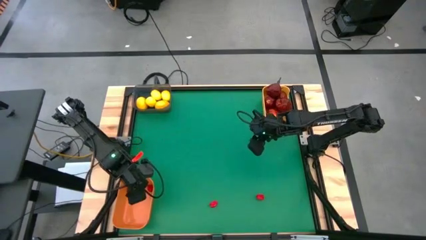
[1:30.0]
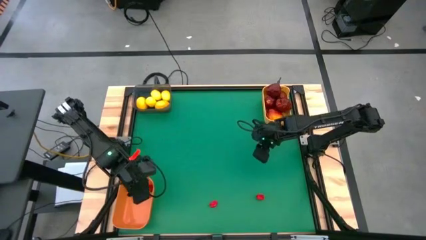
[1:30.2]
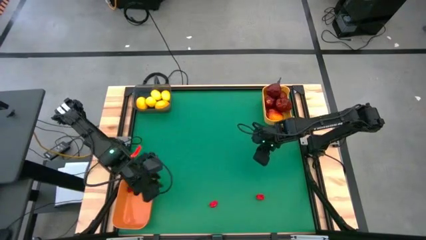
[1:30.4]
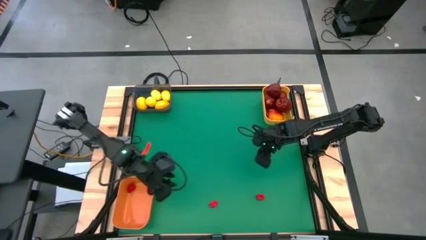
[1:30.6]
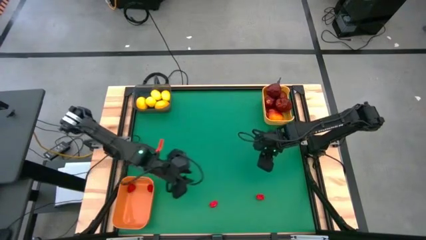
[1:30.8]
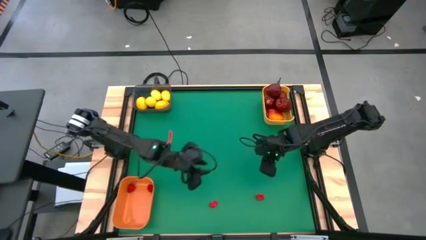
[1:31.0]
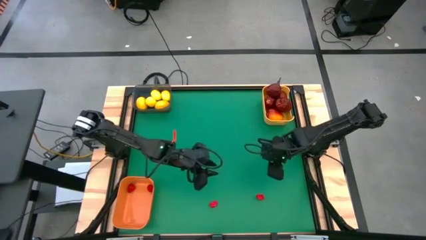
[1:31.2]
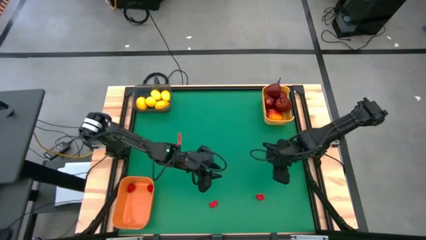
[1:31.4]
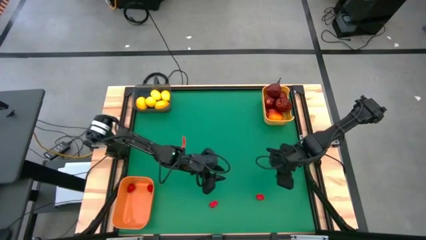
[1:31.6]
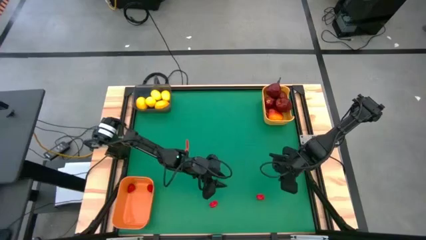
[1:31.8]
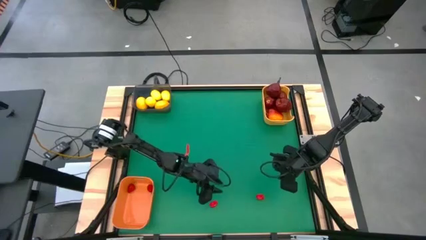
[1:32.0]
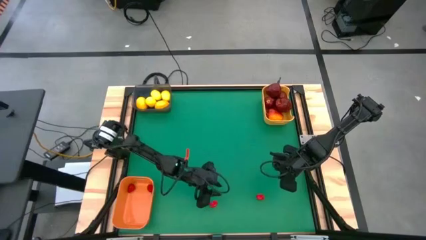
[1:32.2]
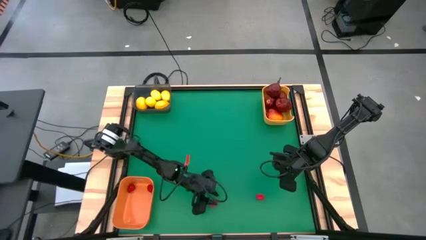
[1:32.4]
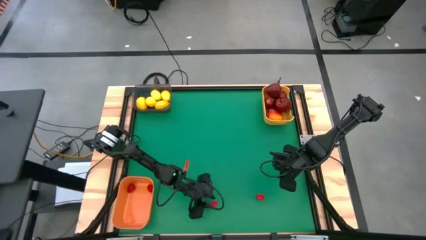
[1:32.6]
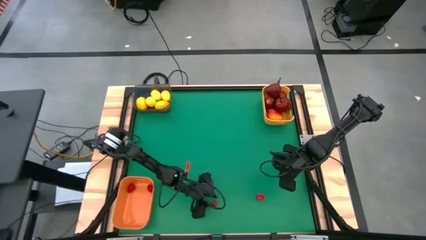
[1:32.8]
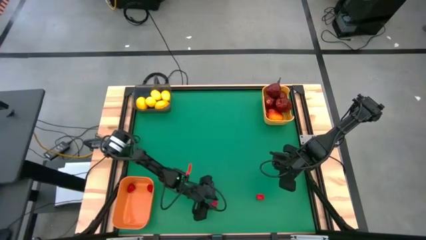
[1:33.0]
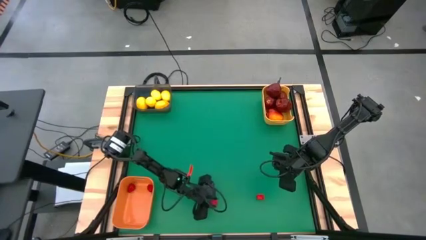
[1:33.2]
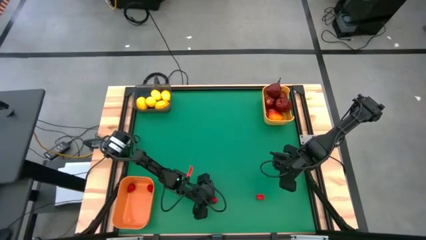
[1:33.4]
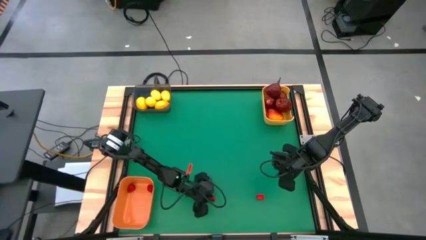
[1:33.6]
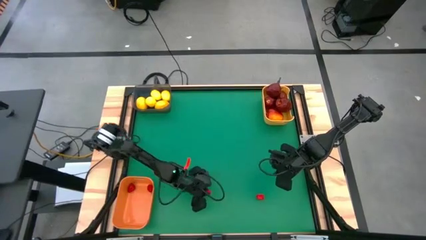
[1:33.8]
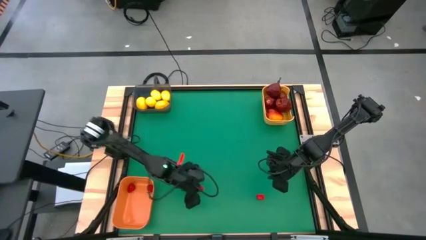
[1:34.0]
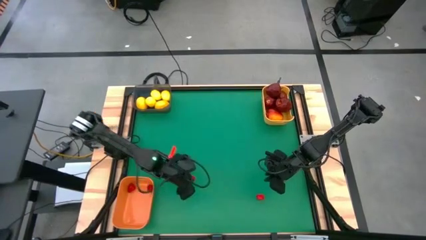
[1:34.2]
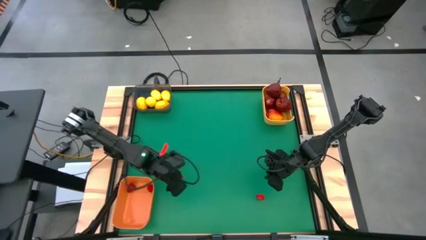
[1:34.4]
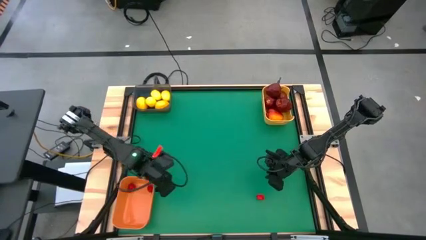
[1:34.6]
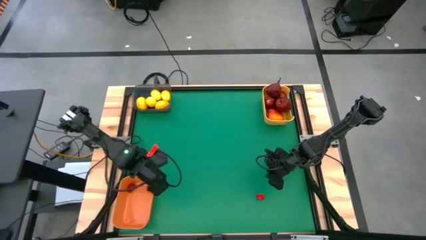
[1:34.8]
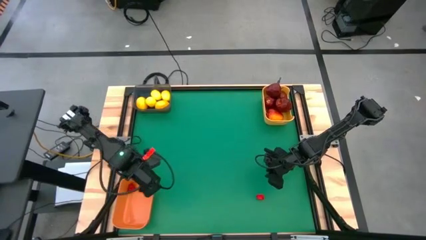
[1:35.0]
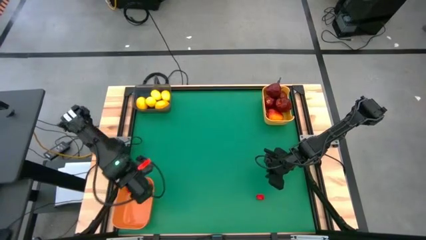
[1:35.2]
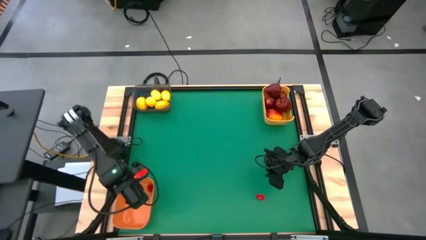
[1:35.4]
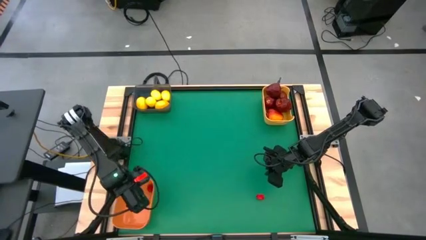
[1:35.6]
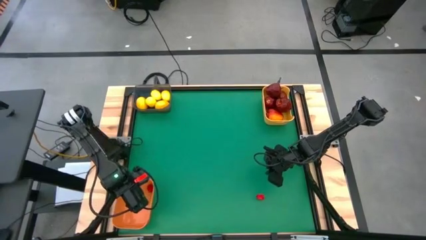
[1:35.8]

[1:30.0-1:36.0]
Task: Sort produce into baskets
Put the left red bell pepper into the orange bin

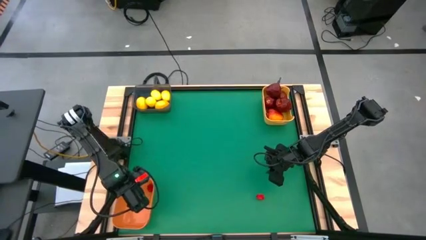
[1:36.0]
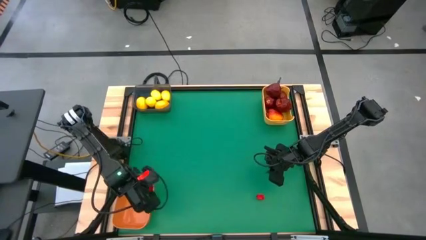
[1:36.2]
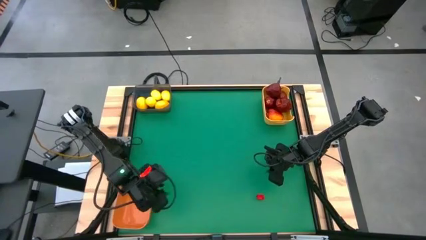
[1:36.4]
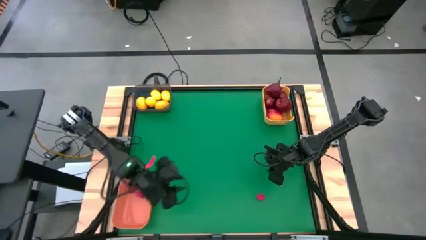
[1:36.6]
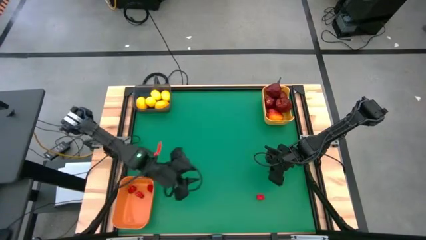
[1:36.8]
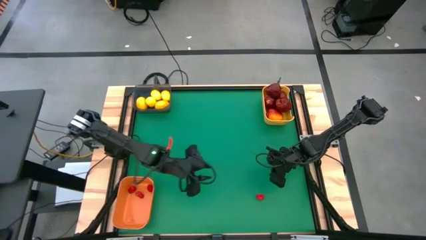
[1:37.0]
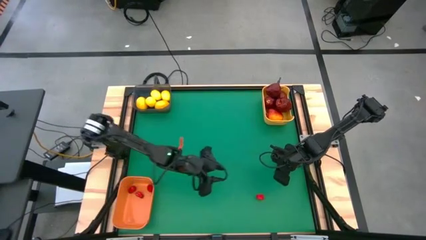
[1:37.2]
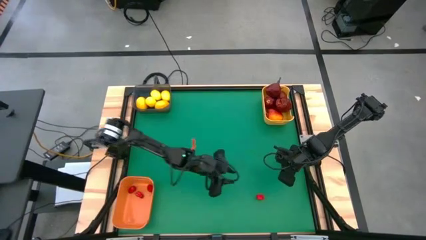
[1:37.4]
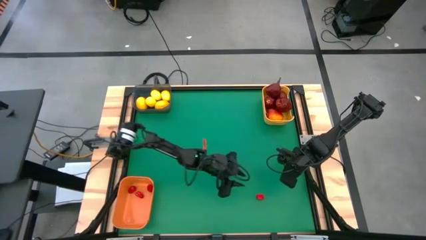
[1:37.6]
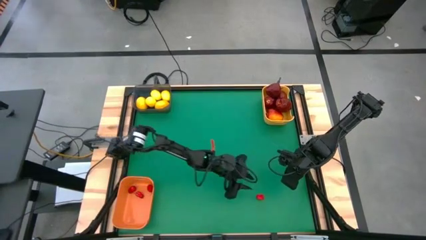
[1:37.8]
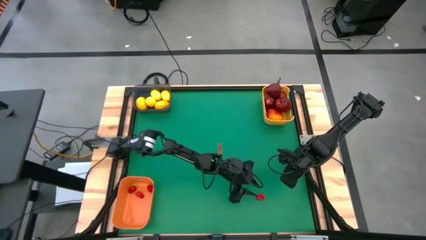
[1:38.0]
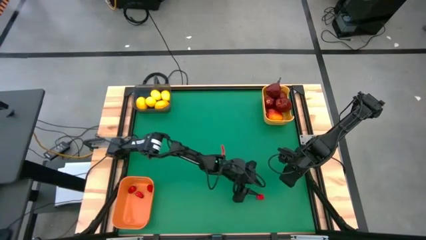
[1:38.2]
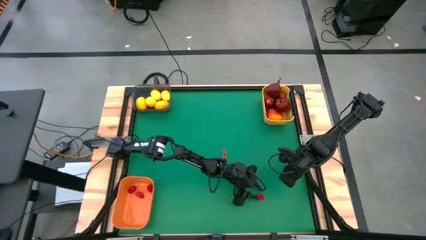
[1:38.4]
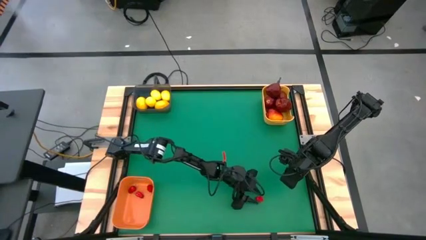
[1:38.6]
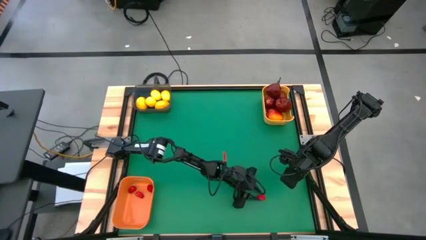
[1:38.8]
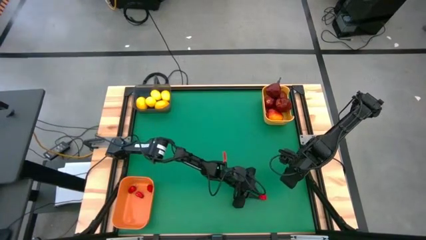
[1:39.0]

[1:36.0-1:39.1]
Put the red bell pepper into the orange bin

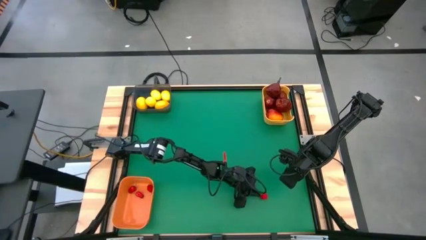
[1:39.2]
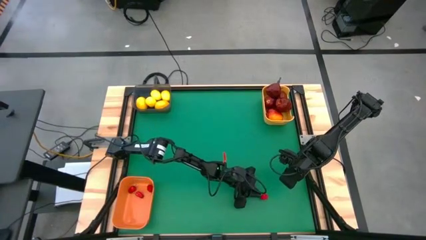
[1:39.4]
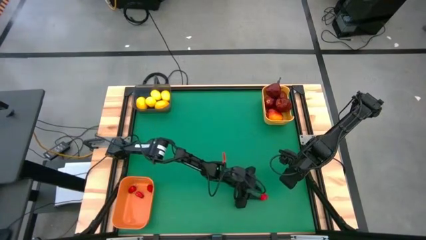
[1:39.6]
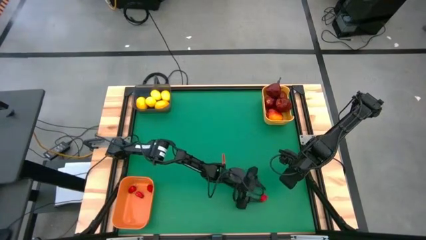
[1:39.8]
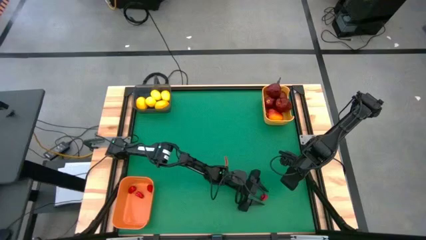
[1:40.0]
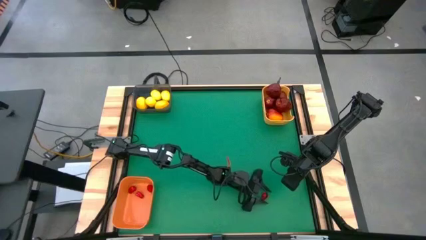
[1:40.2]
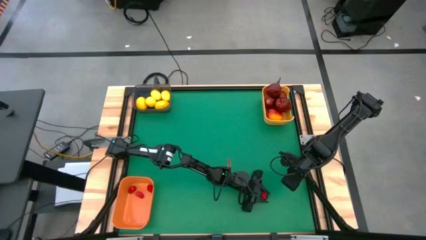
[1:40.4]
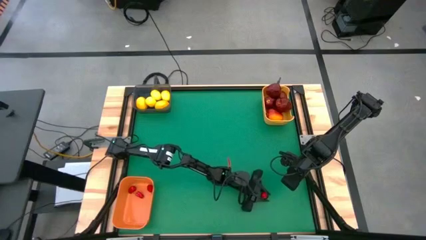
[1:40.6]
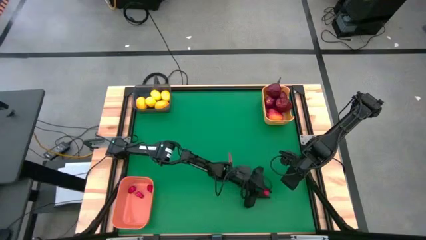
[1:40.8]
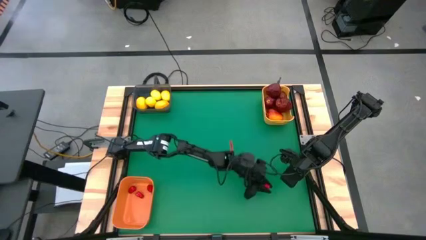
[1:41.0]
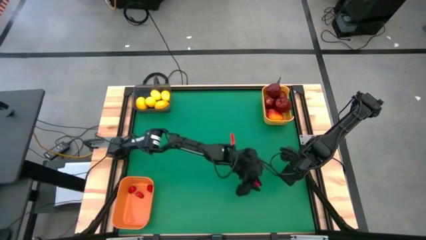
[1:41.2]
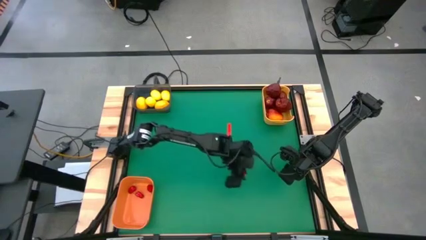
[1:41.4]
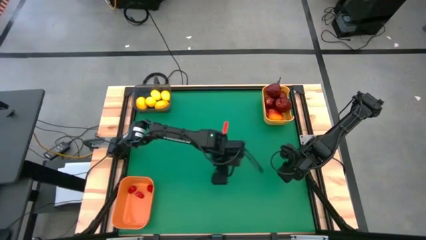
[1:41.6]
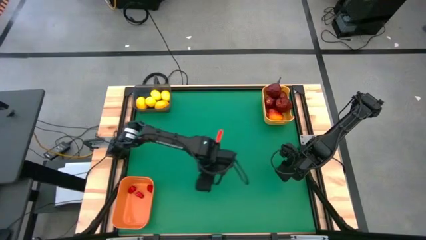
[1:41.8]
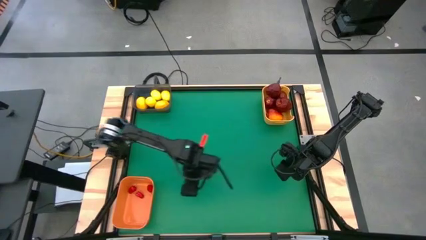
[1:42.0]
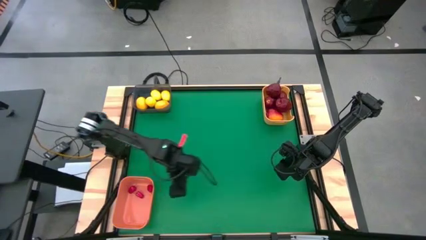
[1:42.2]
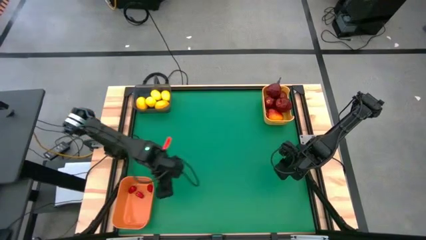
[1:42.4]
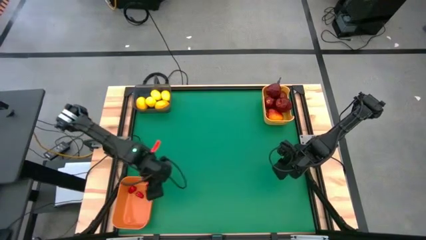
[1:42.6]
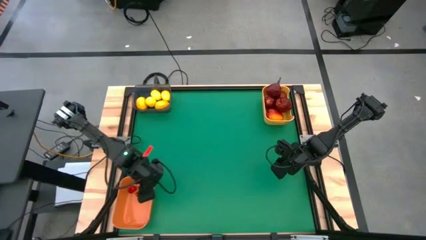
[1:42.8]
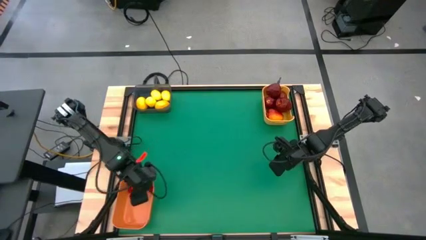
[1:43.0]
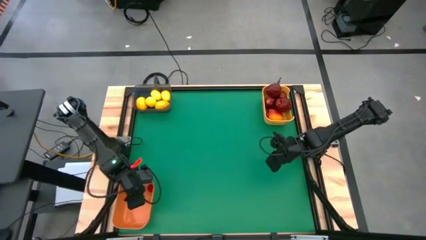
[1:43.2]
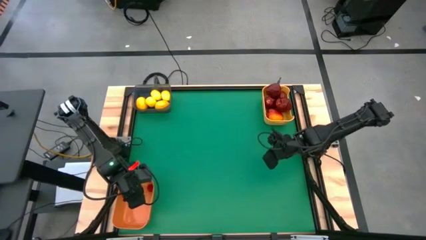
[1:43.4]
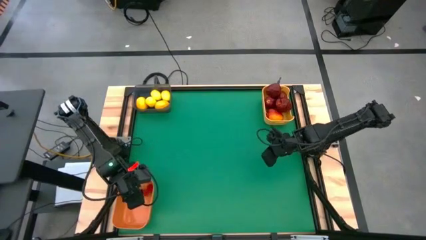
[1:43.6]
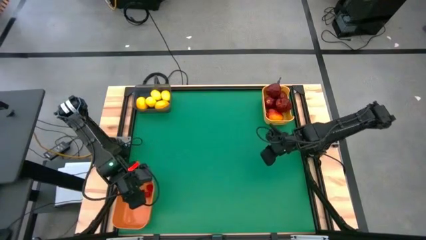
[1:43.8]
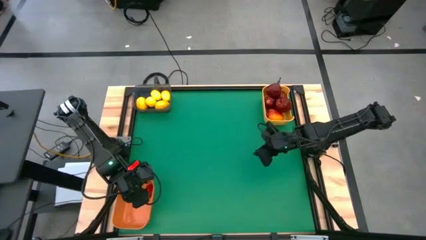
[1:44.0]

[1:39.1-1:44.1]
Put the red bell pepper into the orange bin

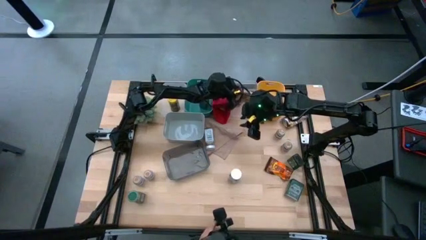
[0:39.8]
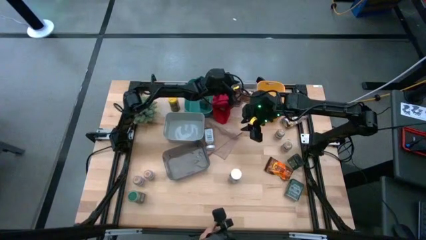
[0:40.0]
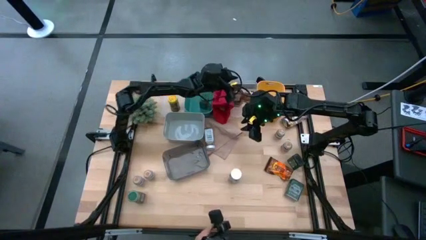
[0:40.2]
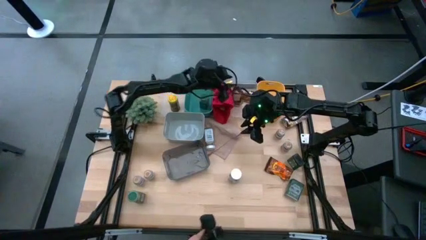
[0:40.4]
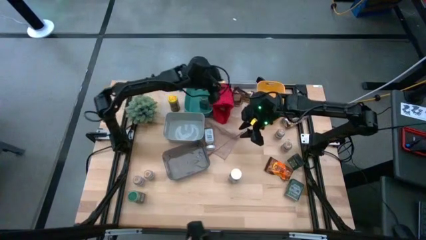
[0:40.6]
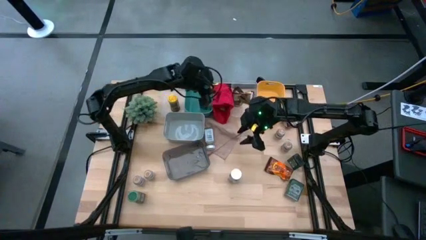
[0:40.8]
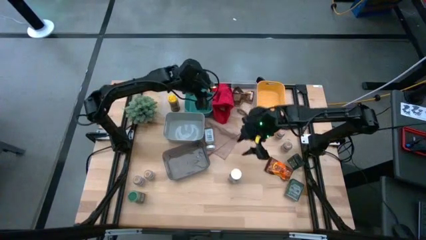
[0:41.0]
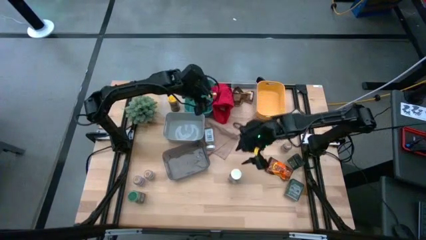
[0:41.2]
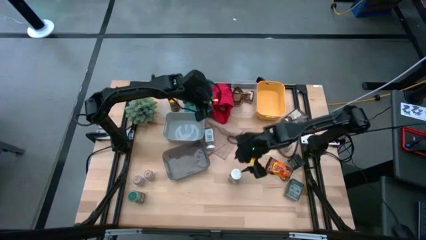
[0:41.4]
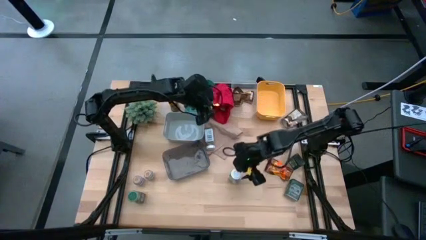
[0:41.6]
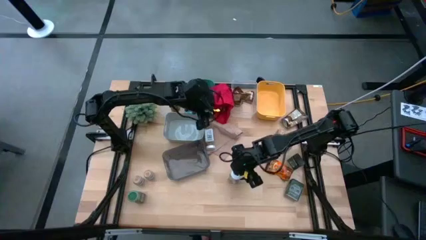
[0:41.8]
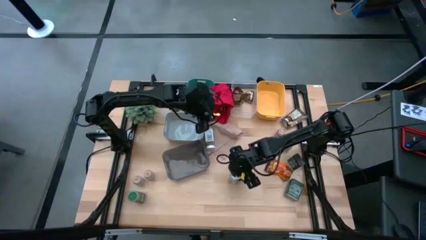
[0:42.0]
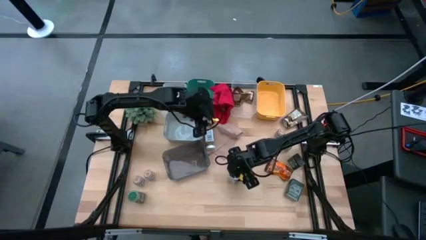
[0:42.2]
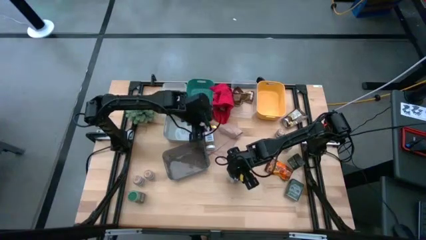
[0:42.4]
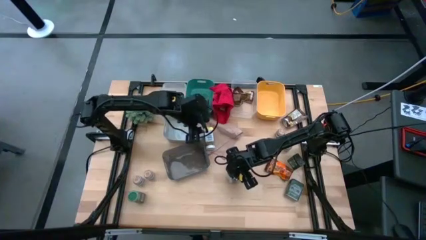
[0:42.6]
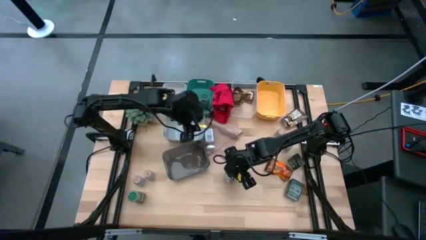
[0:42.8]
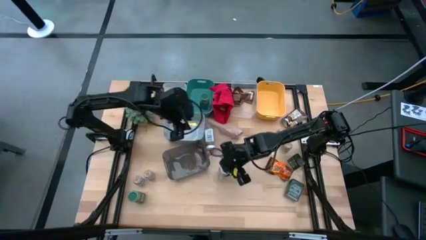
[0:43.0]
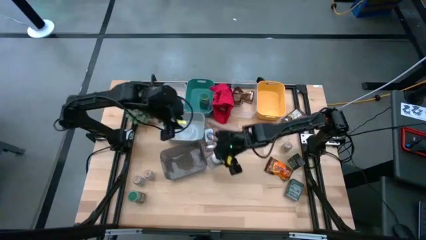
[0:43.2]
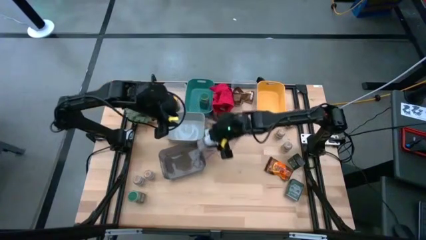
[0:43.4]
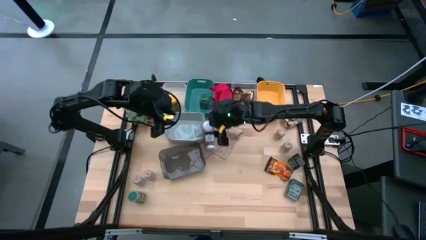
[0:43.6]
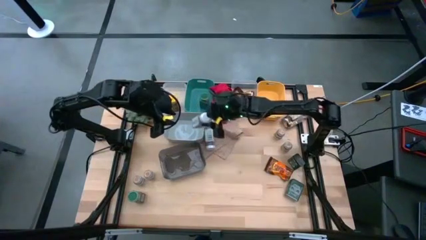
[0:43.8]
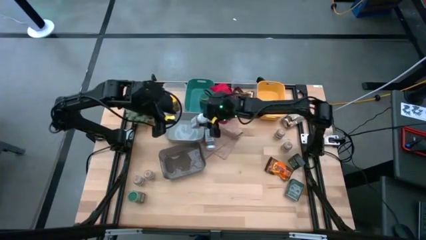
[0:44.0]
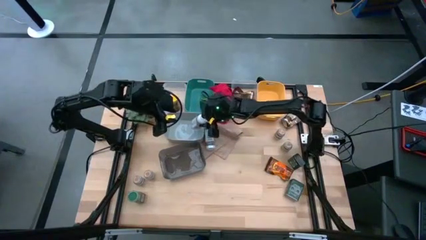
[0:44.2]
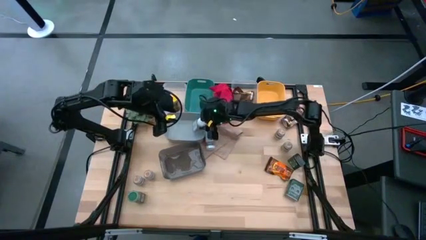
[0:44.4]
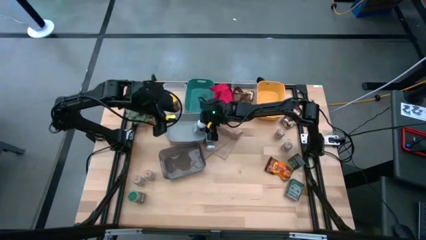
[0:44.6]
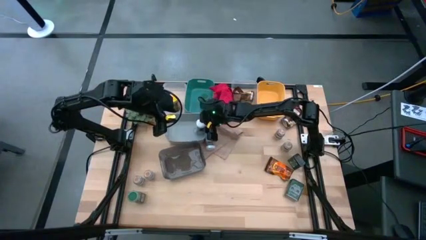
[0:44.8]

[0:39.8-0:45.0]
Task: Sort spices by type
Put the white seasoning bottle into the gray bin
